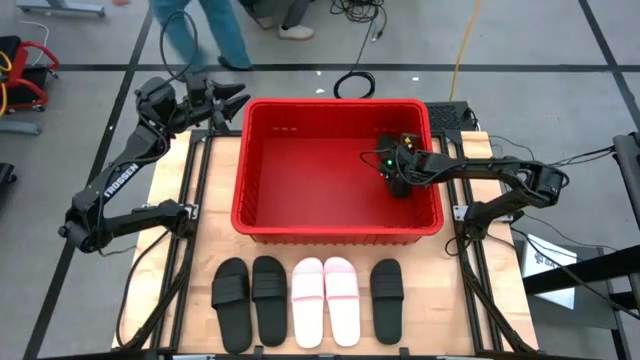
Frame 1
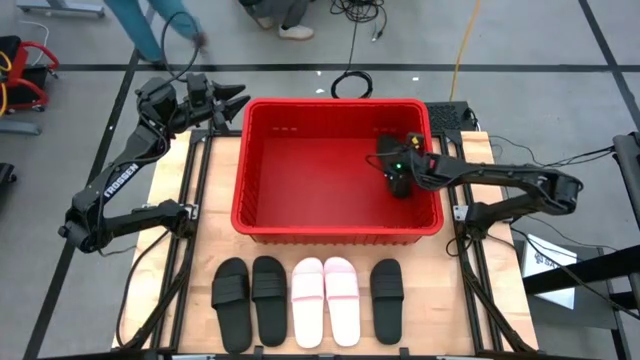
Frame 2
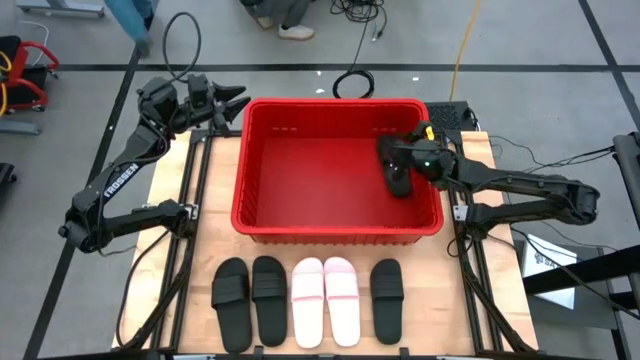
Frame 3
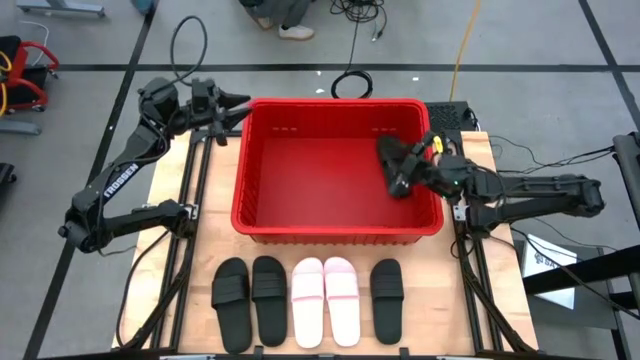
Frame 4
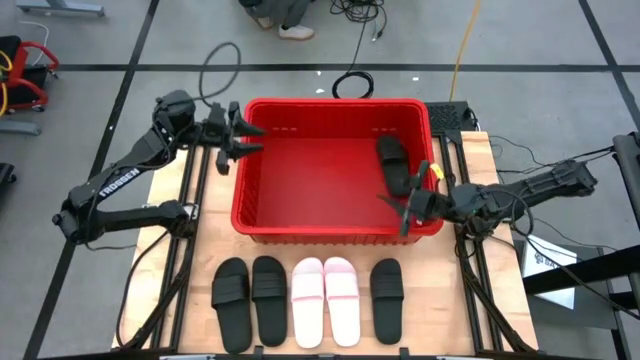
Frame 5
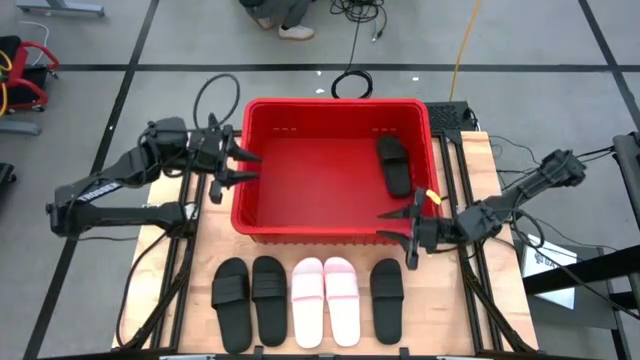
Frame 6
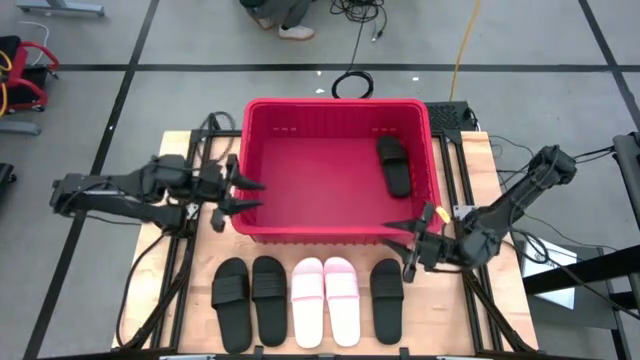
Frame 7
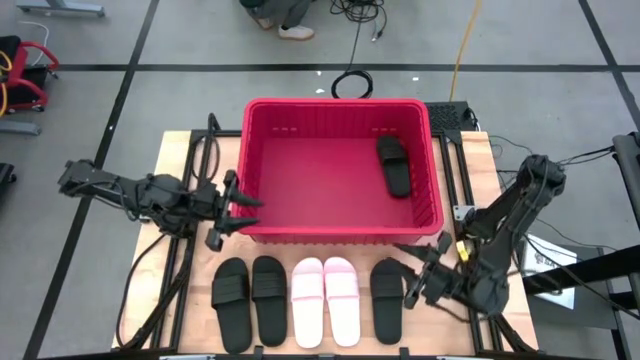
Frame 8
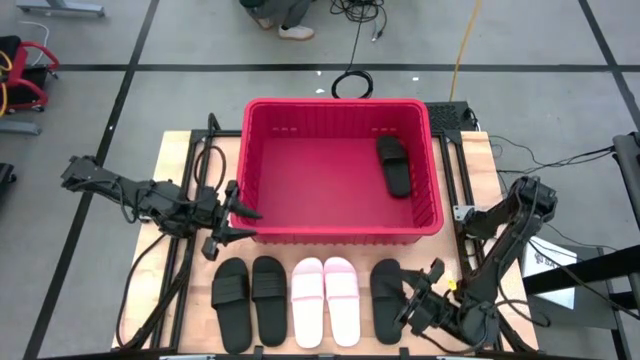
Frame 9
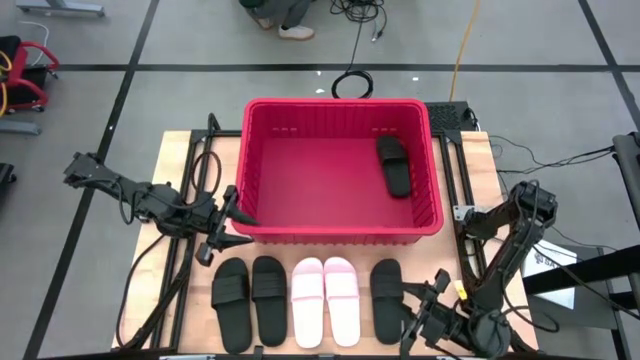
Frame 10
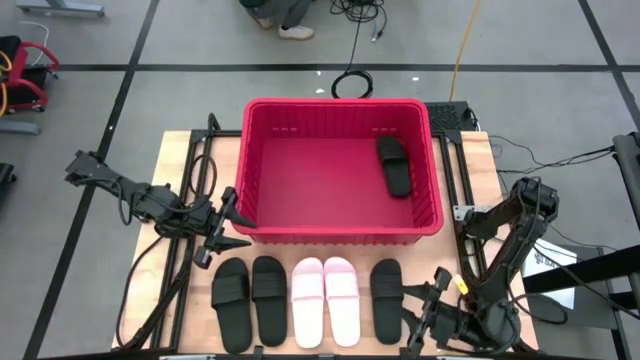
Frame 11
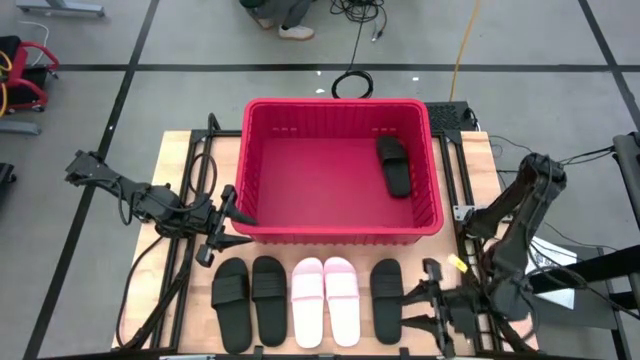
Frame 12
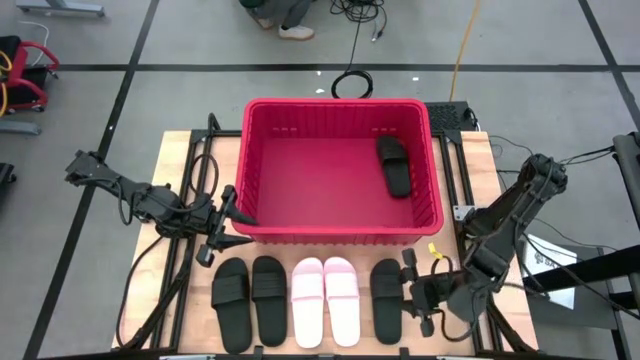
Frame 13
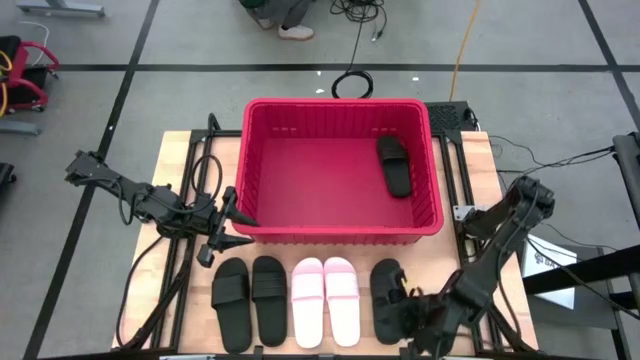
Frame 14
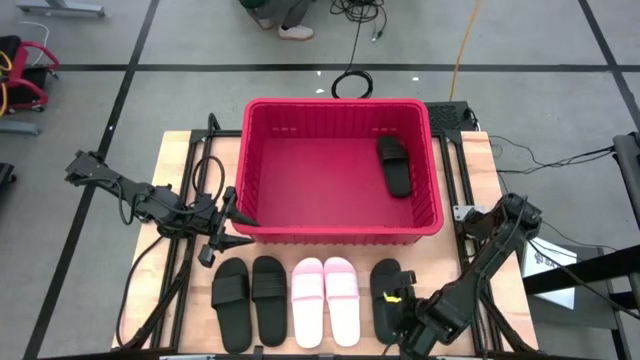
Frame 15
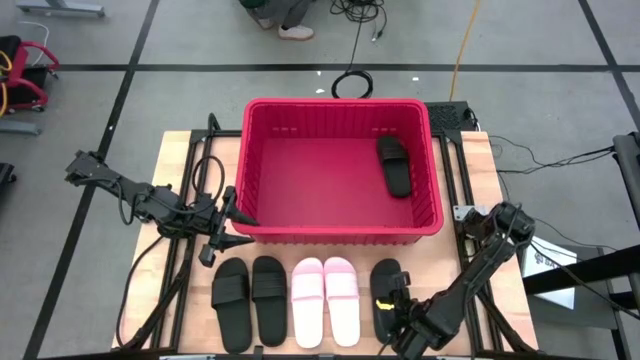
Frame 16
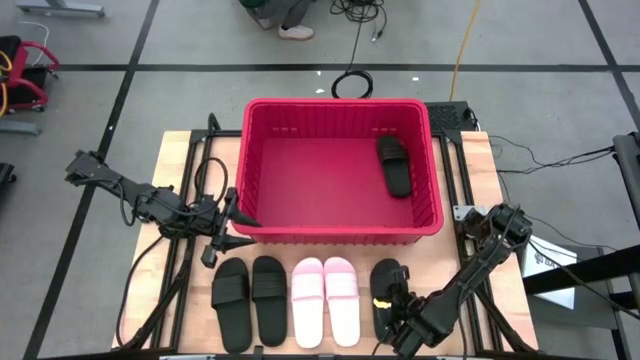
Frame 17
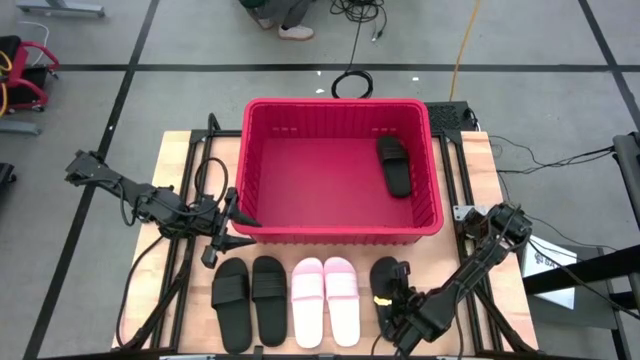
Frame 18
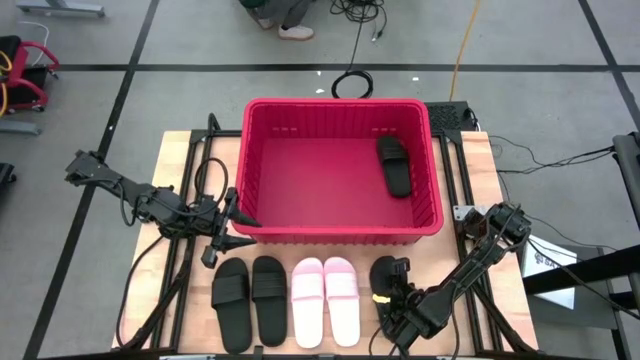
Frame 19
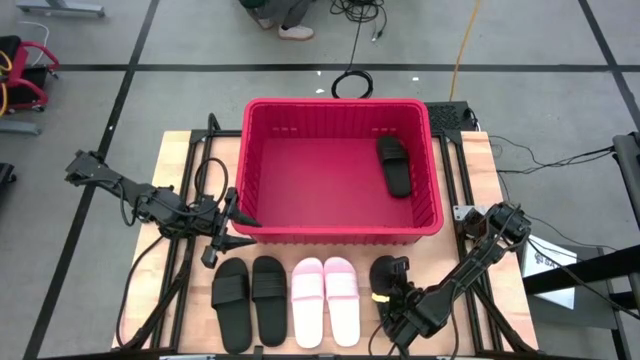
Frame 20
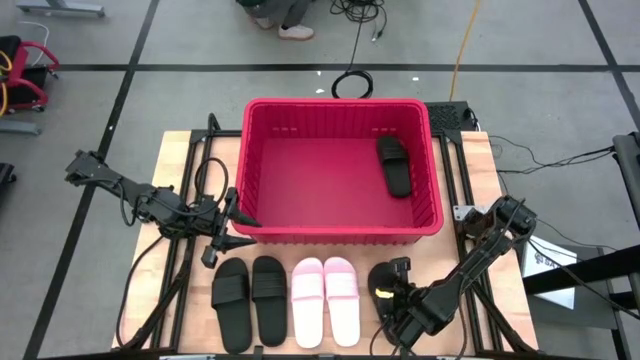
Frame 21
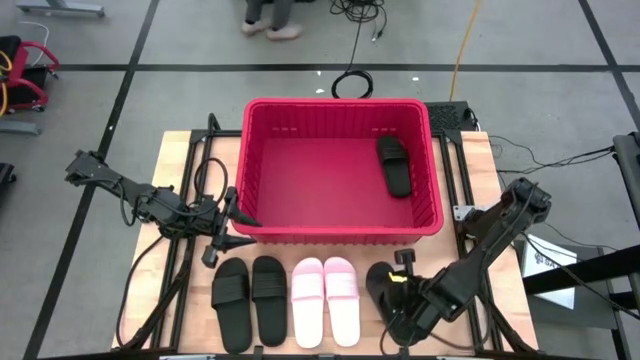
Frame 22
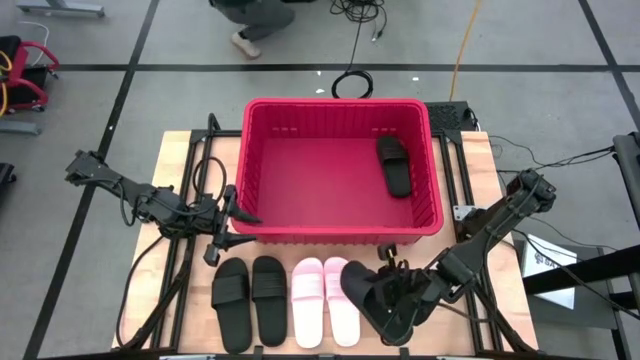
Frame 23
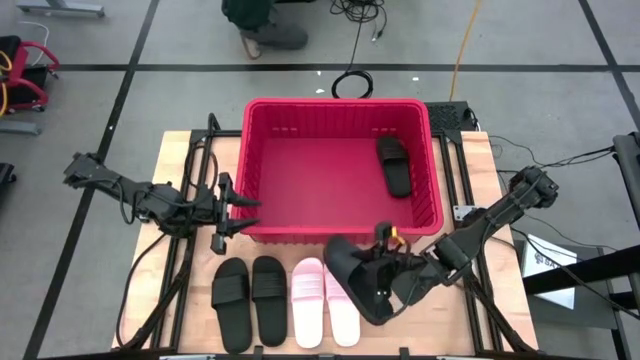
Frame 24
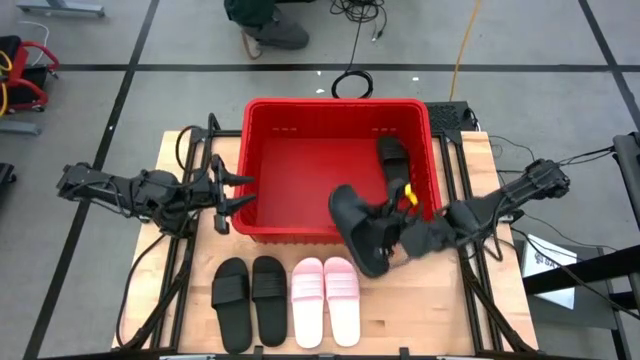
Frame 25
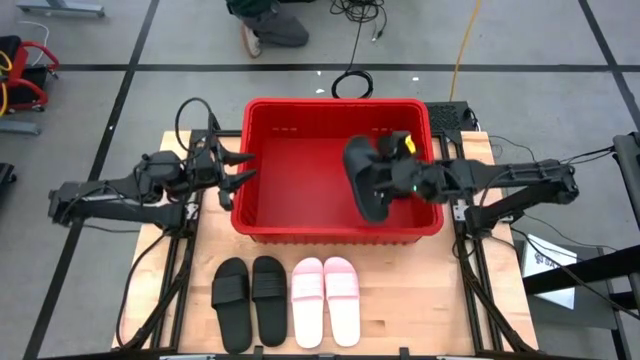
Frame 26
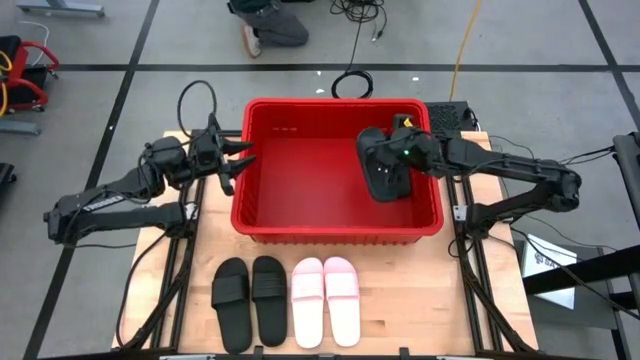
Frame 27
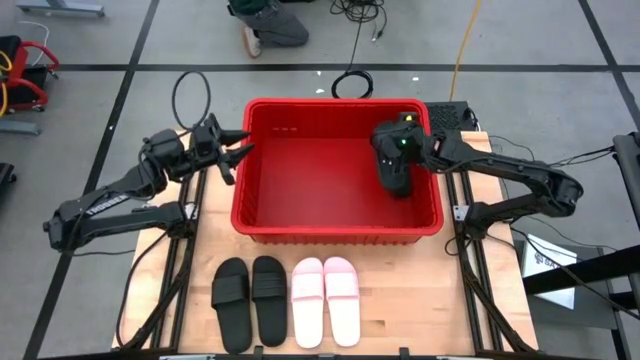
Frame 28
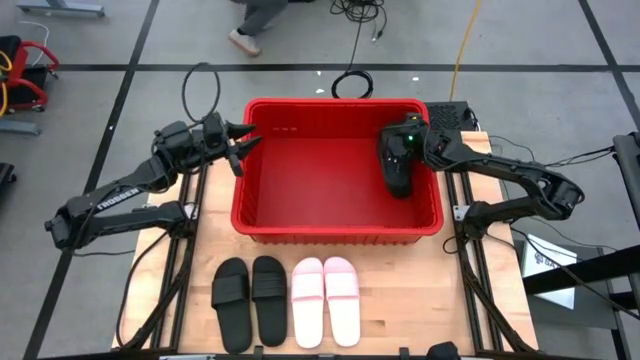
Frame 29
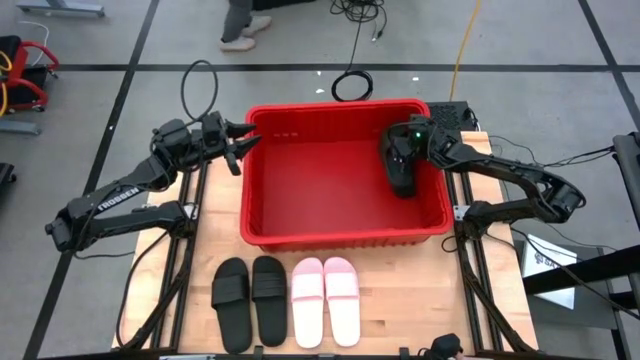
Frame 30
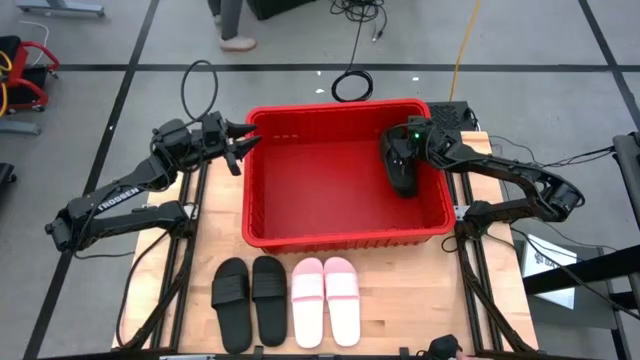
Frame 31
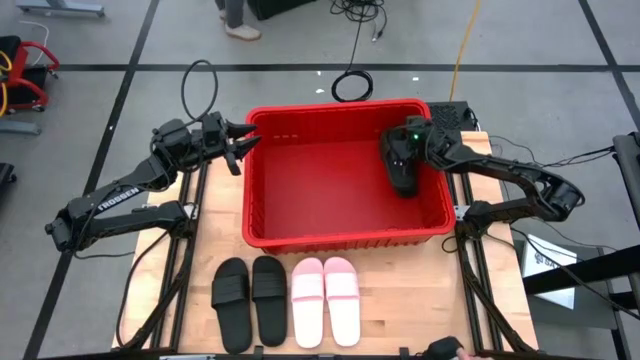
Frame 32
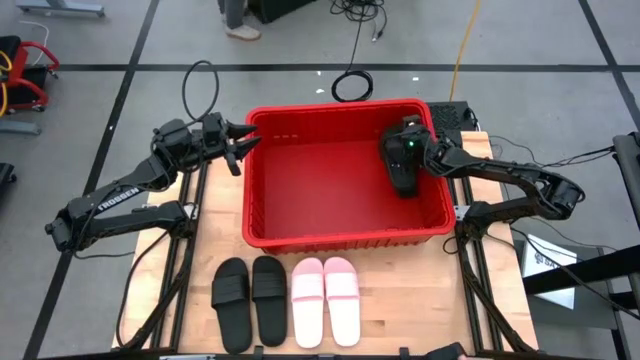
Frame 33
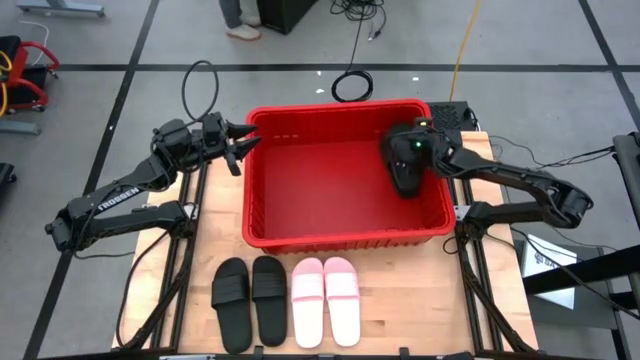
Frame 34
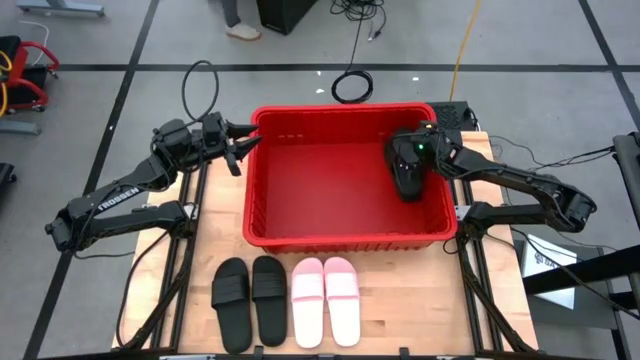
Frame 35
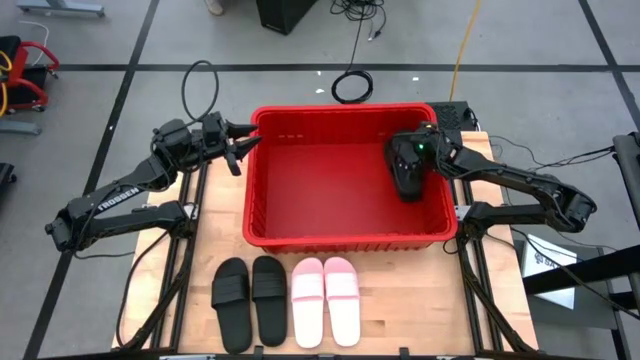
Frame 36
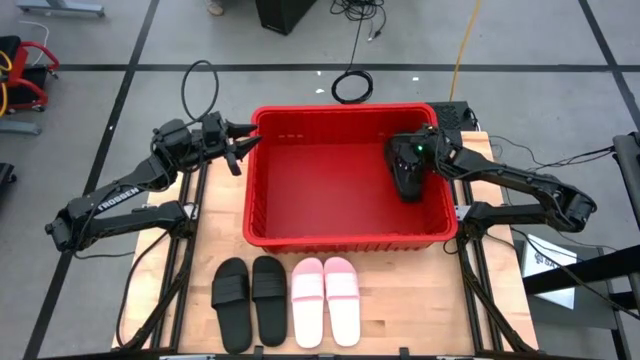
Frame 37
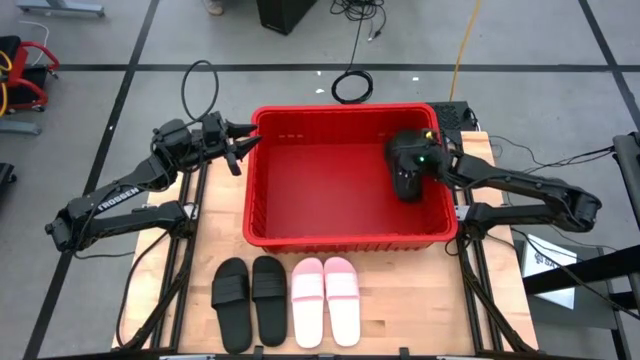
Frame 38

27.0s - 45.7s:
Task: Pick and place slides into bin
Put the right black slide into the bin
